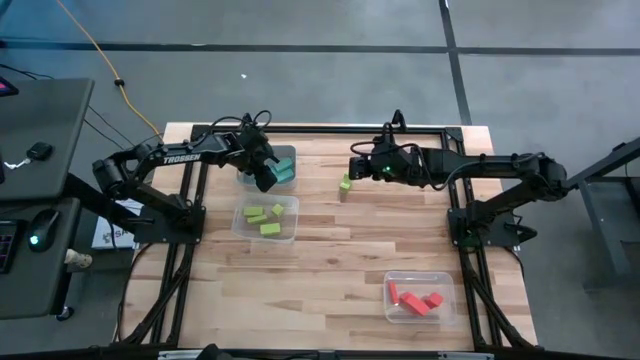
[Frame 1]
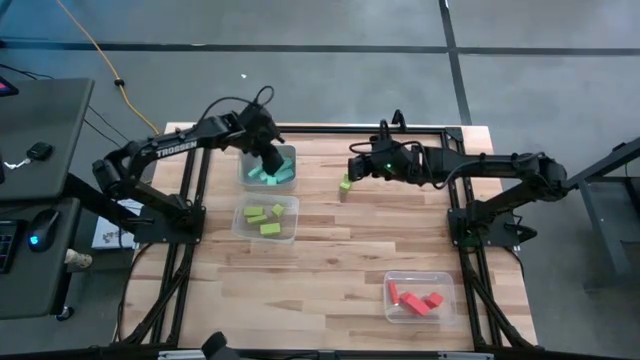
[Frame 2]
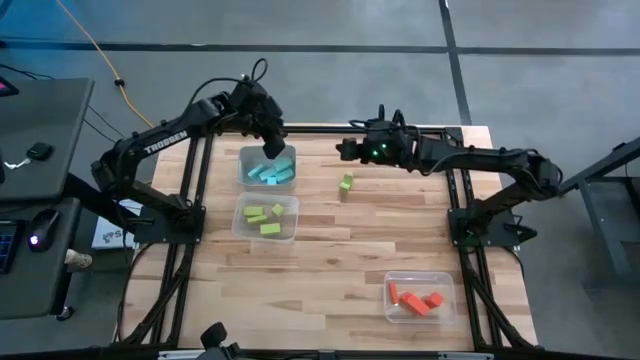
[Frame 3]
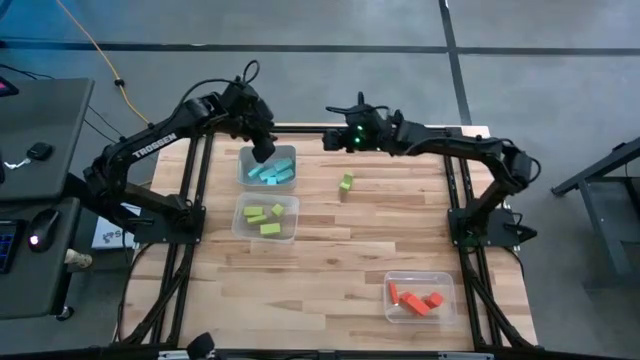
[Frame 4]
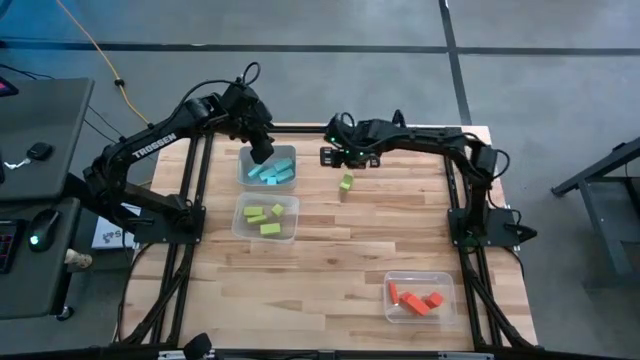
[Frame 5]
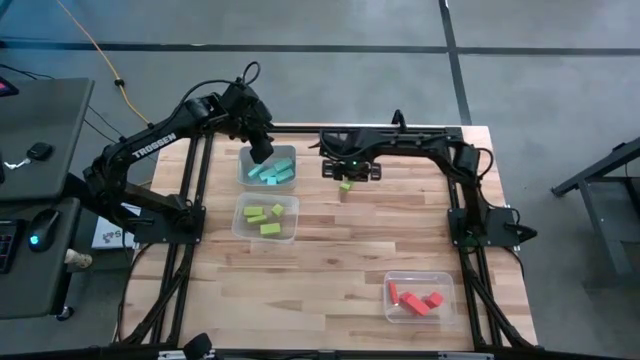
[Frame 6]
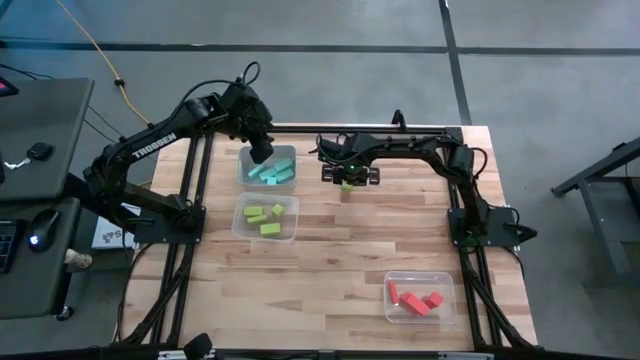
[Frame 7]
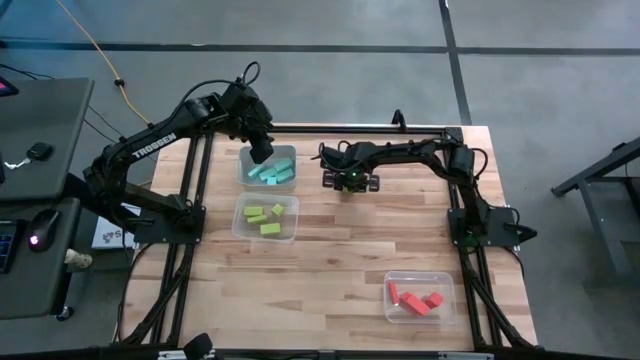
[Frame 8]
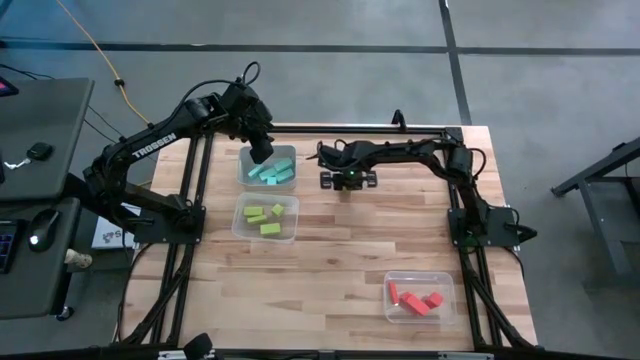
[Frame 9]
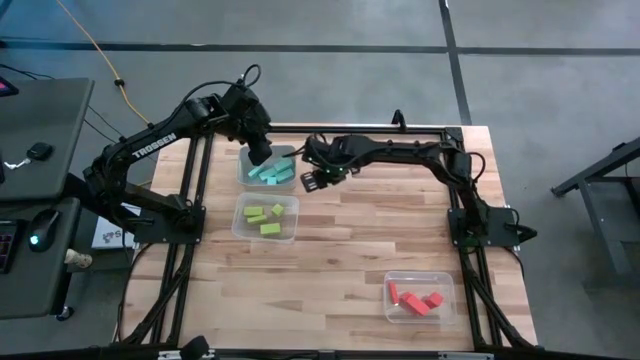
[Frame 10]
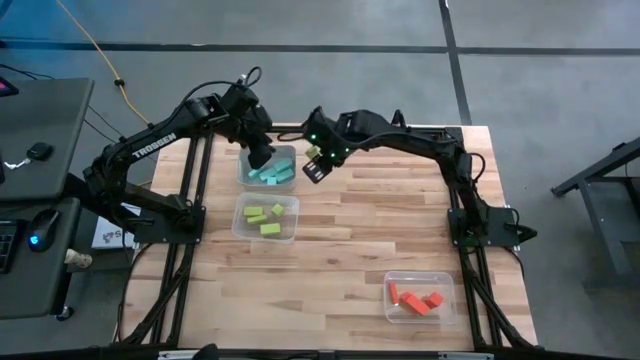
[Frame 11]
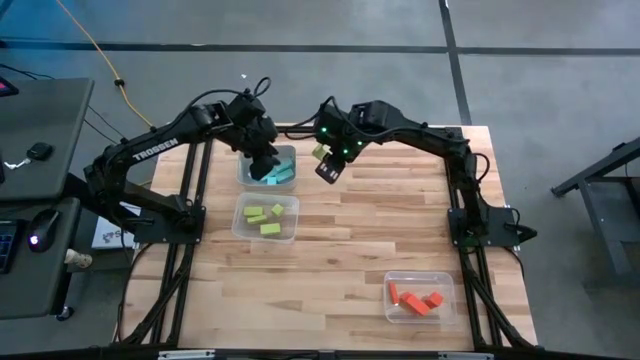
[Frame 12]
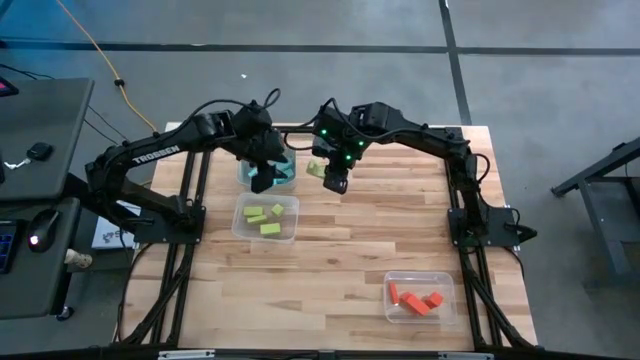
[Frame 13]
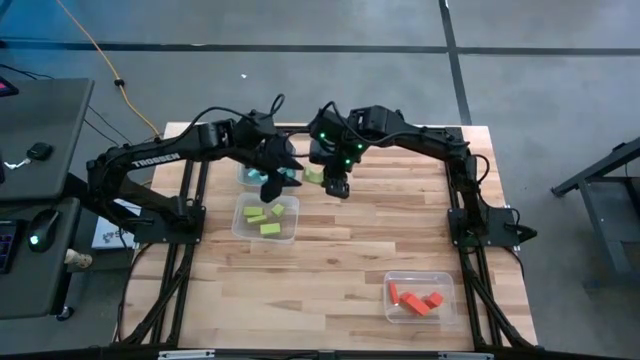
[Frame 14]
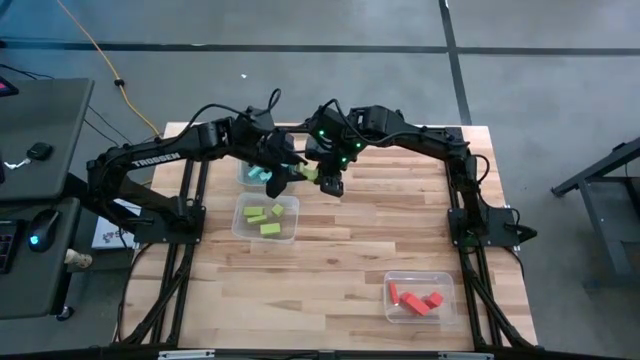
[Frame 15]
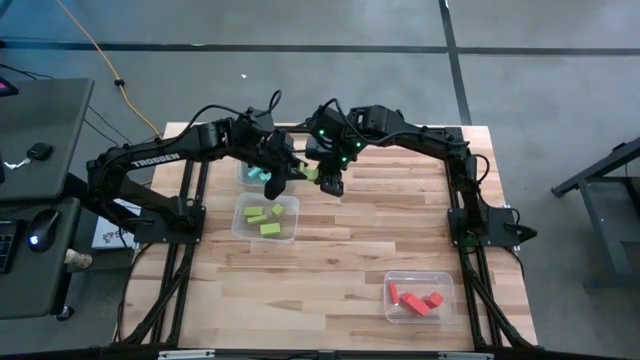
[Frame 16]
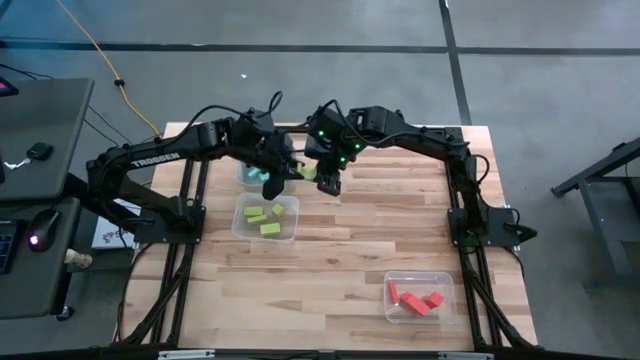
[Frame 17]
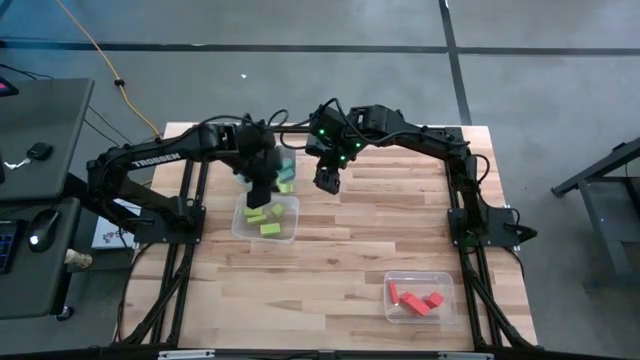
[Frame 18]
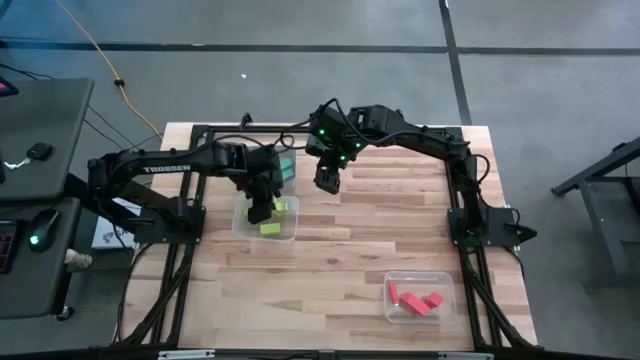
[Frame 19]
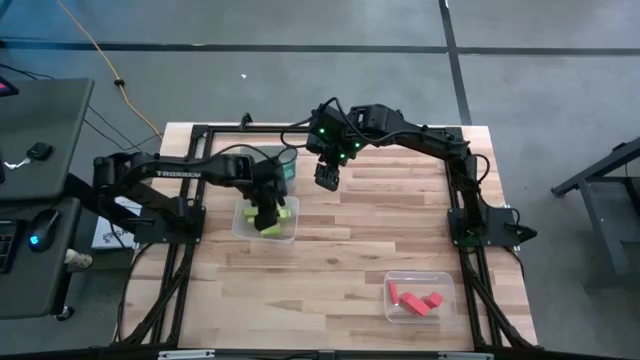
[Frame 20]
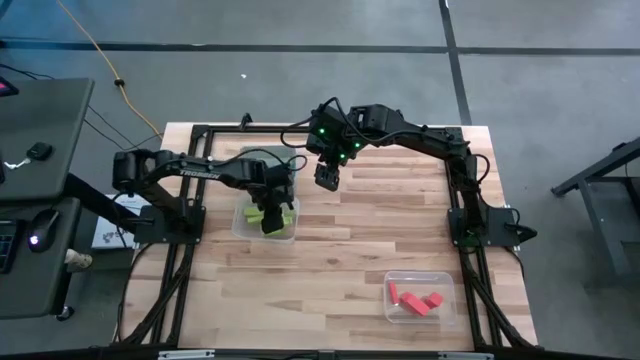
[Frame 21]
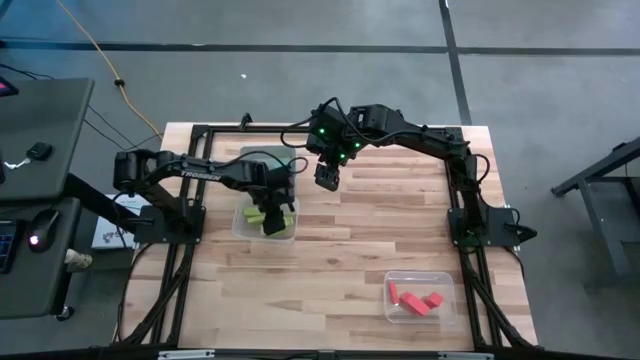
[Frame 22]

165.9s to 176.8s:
Task: Sort & place blocks by color
Put the green block into the left transparent bin

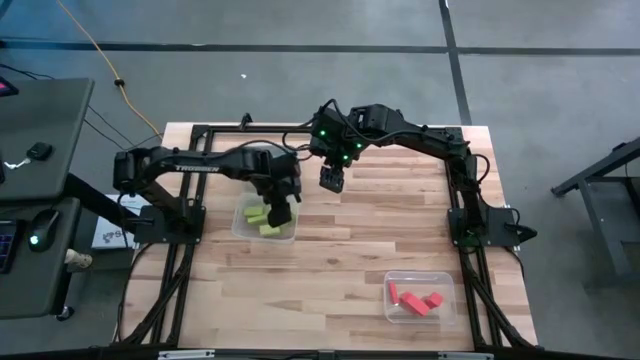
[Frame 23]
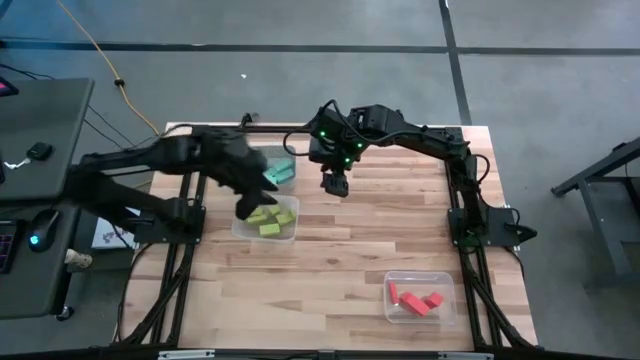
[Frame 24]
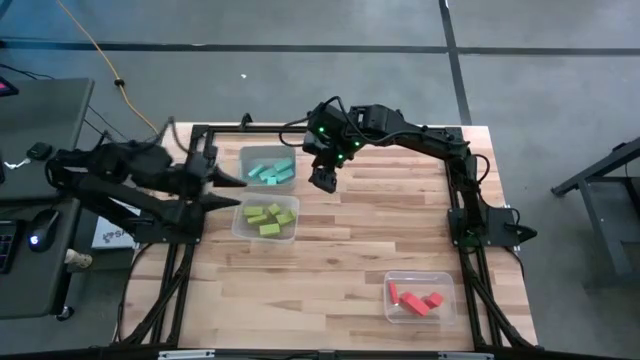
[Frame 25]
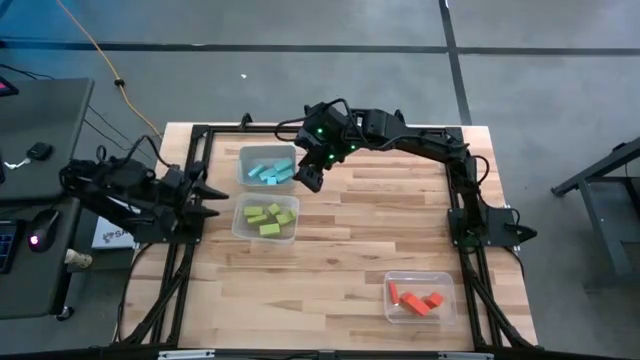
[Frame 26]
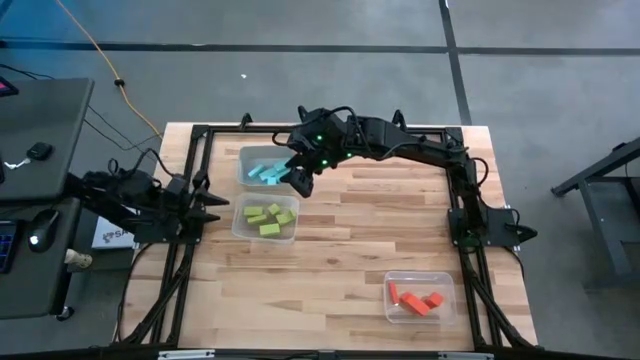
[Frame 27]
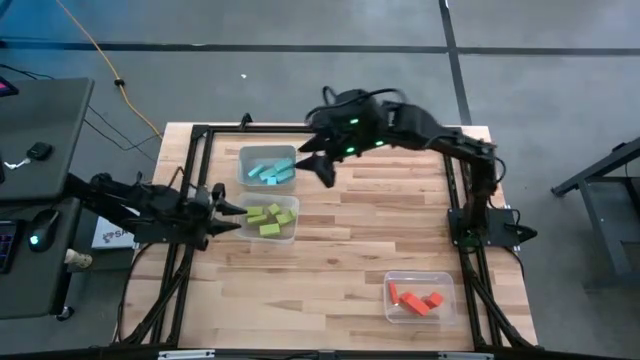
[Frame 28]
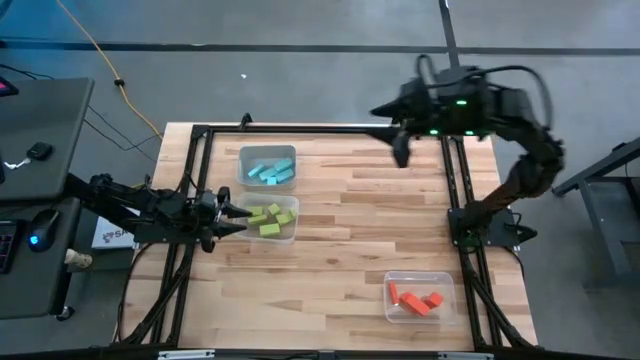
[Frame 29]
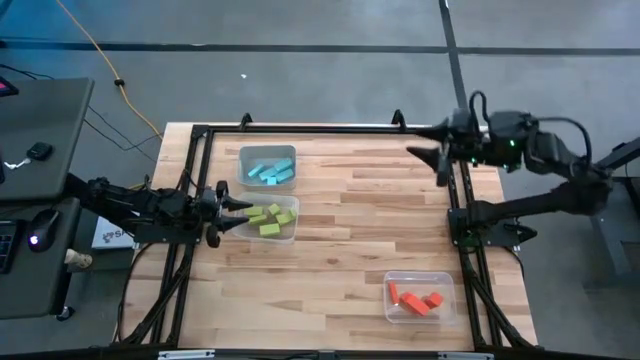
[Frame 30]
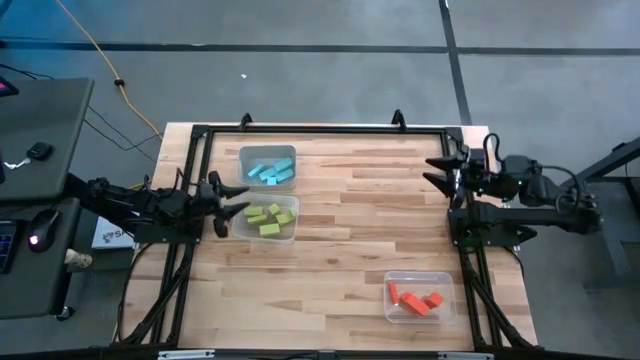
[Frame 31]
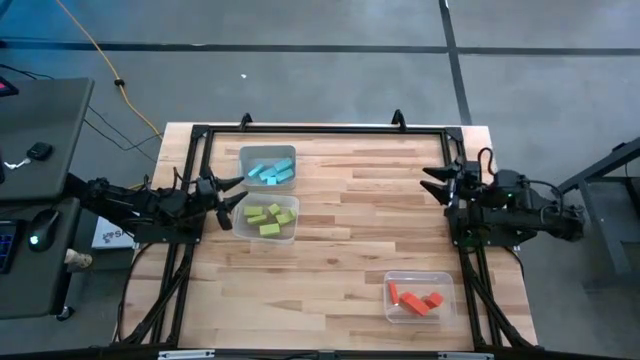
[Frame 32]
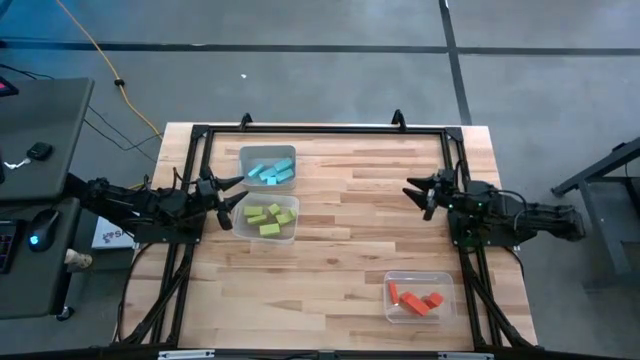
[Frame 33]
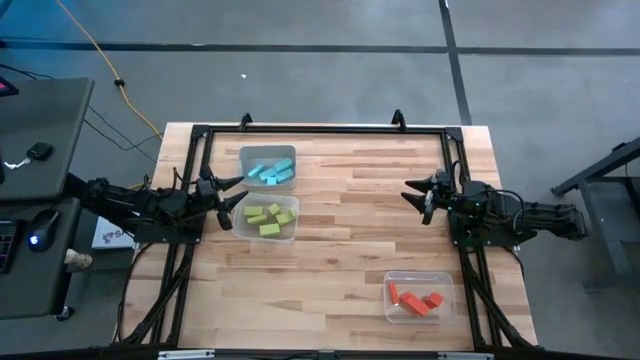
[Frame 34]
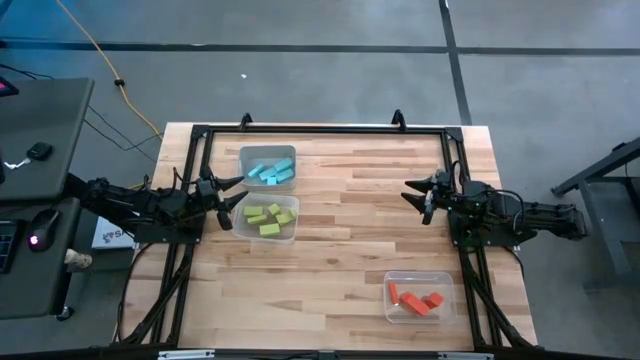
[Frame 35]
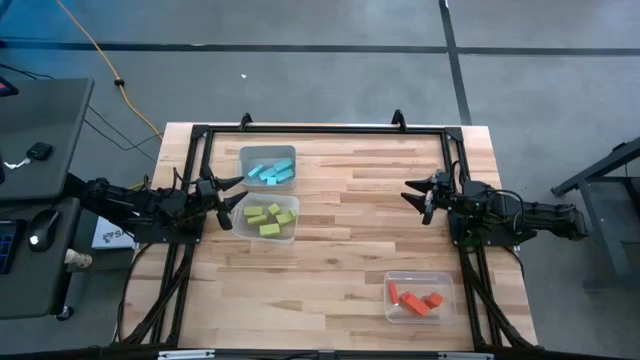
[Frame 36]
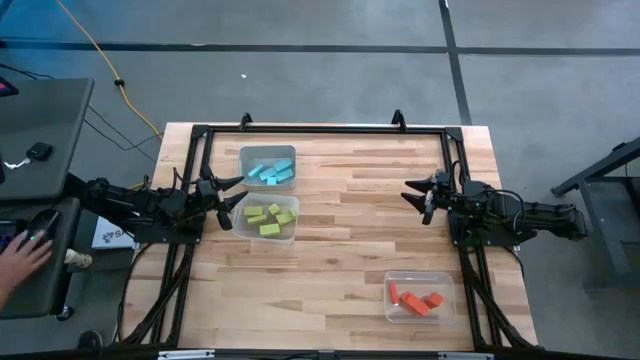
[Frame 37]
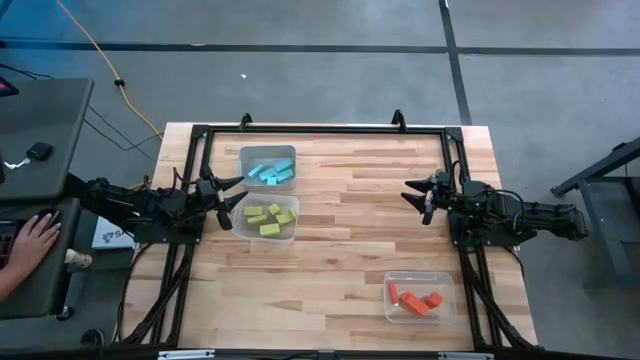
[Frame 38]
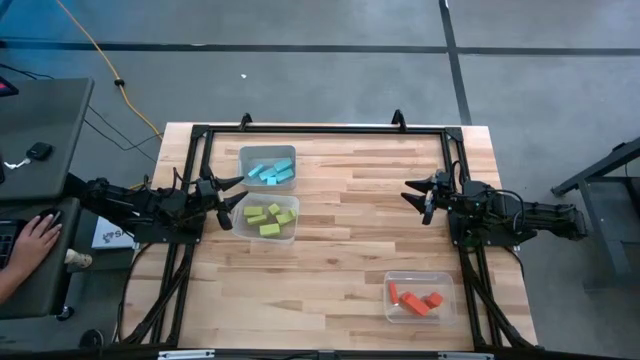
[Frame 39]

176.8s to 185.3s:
Return to Home Position

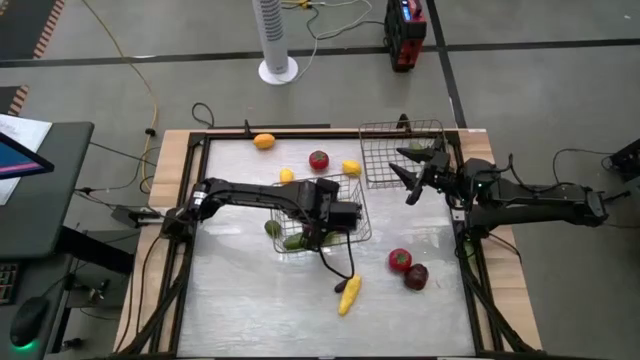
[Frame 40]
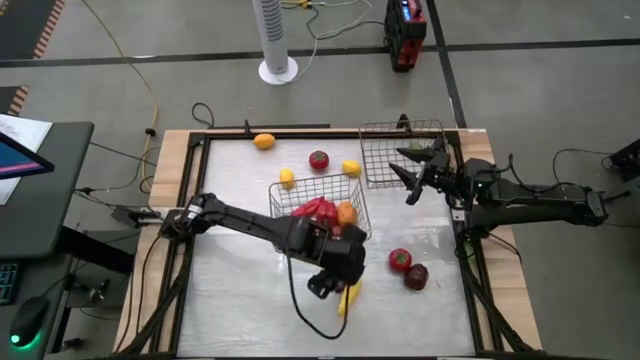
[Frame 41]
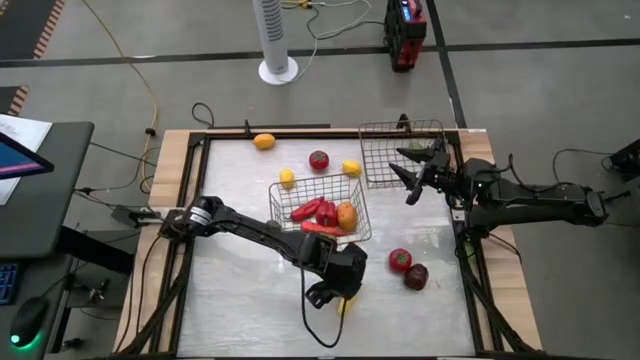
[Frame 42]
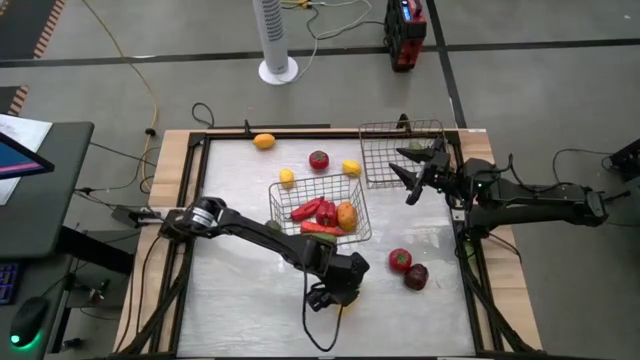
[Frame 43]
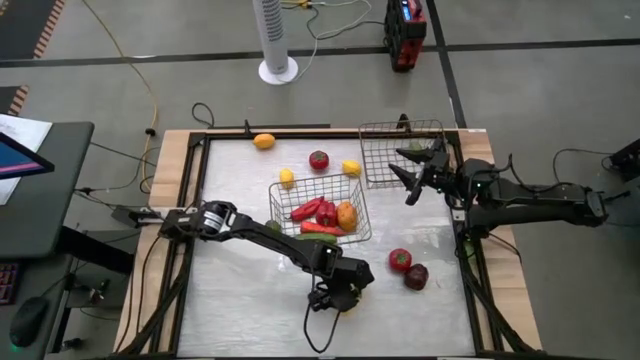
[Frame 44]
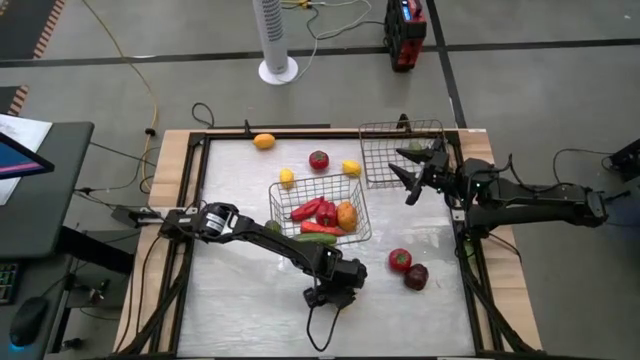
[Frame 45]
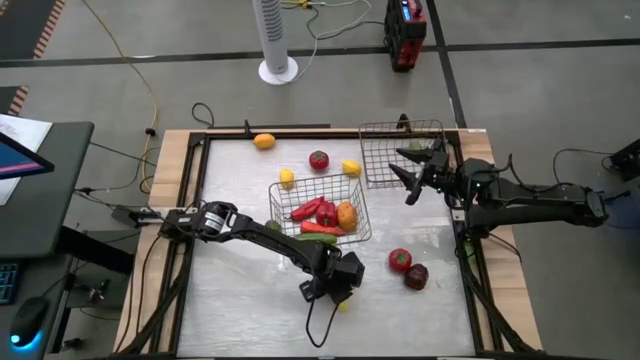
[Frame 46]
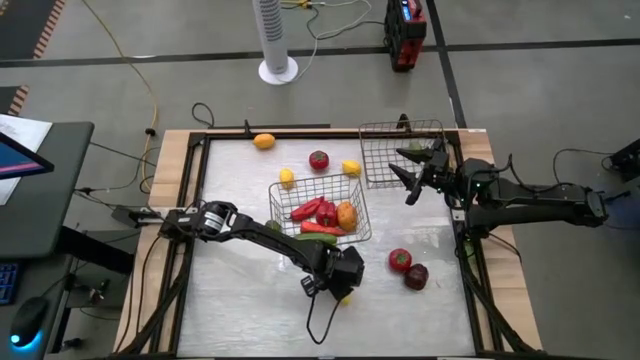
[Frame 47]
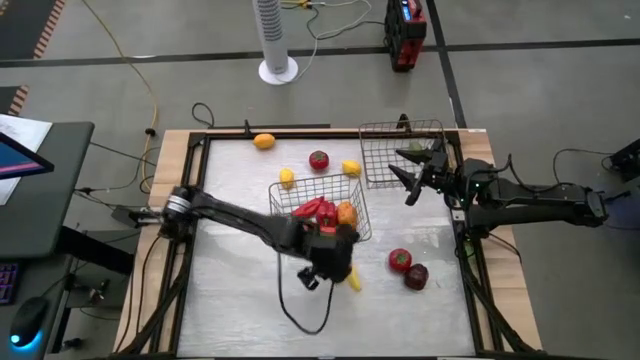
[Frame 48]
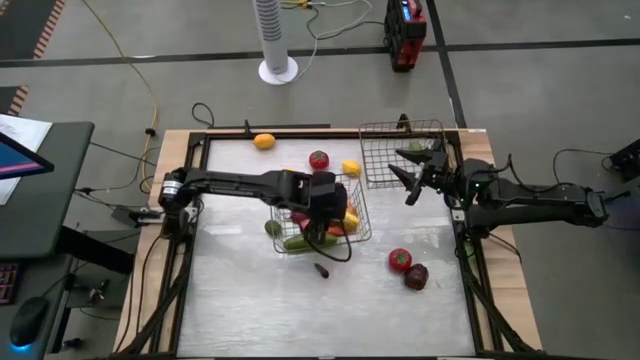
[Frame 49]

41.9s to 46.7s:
Task: Sort produce into baskets
Put the yellow corn into the left wire basket
